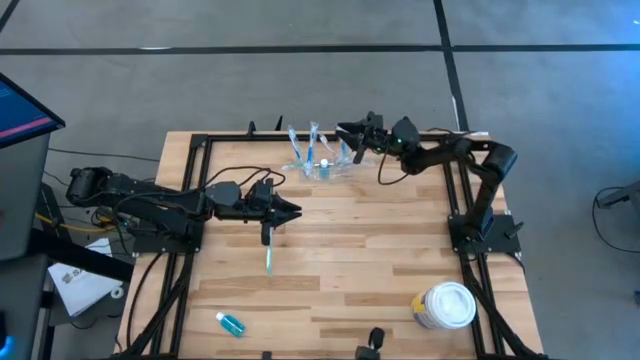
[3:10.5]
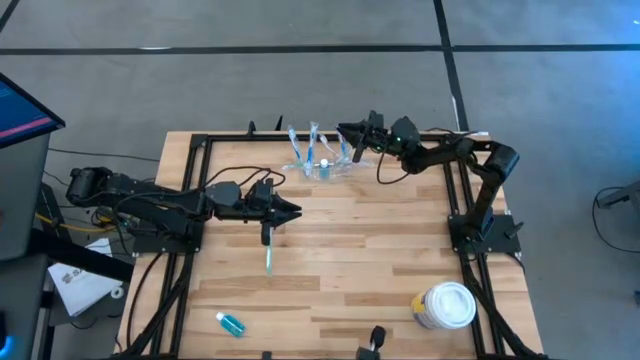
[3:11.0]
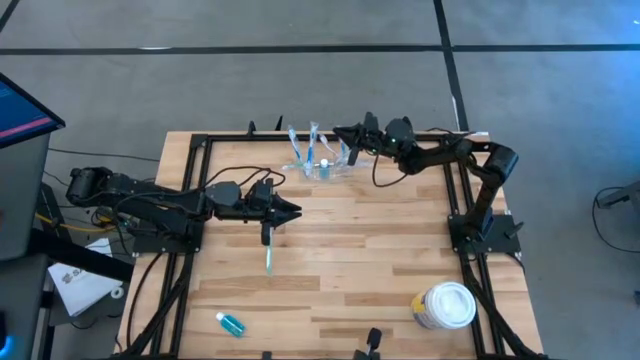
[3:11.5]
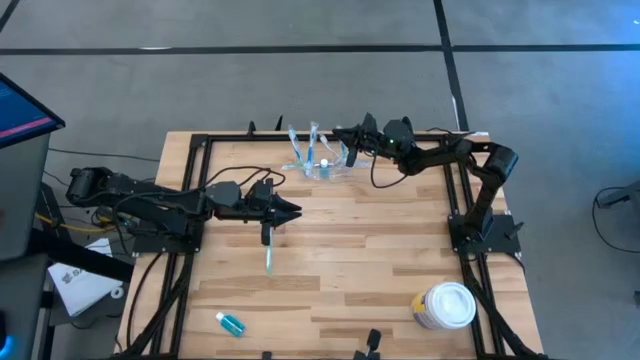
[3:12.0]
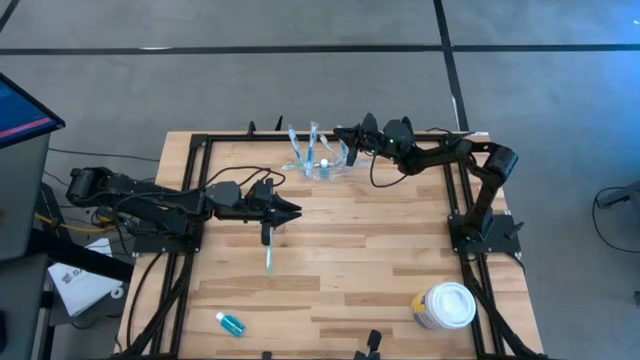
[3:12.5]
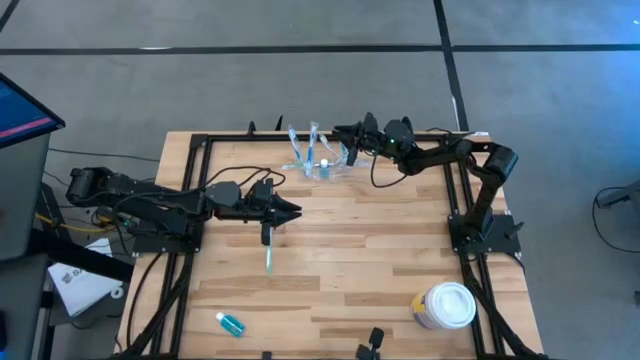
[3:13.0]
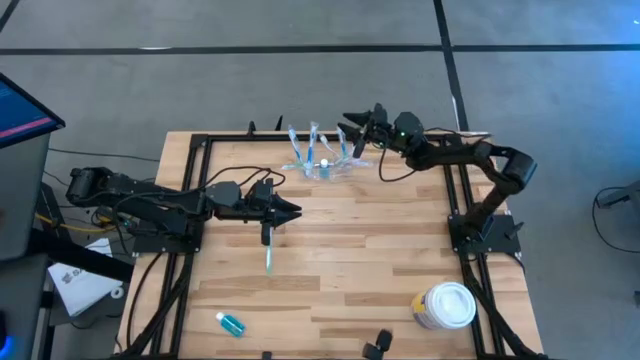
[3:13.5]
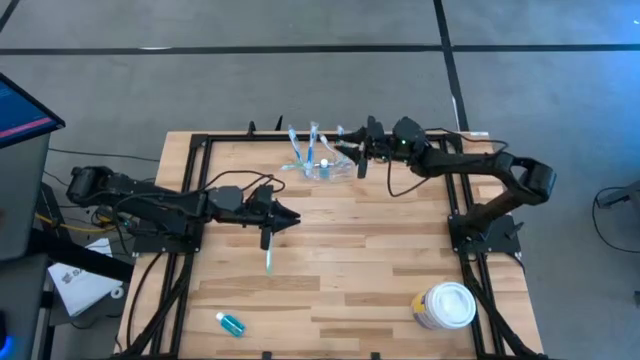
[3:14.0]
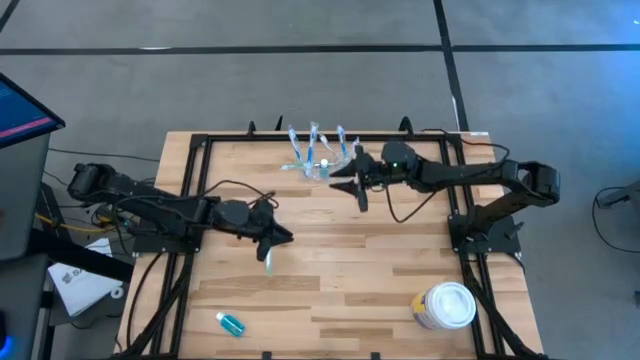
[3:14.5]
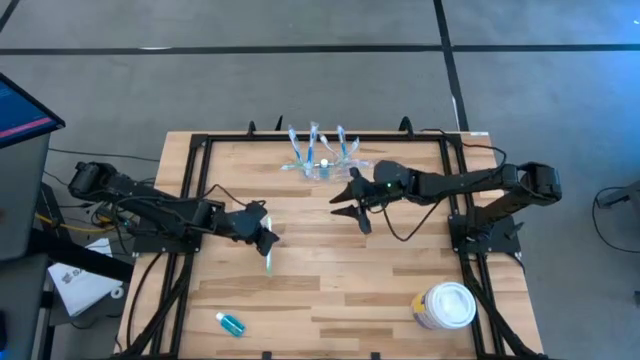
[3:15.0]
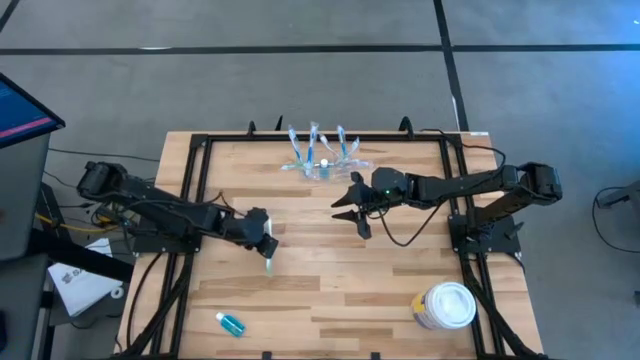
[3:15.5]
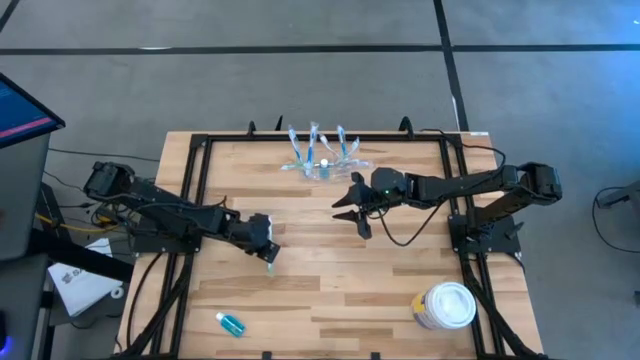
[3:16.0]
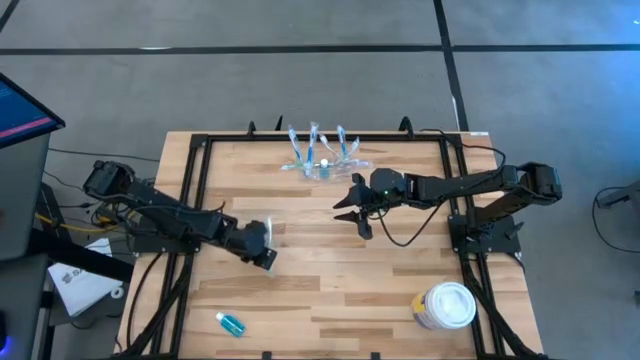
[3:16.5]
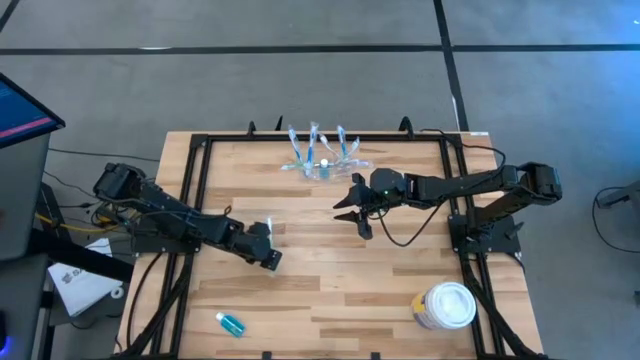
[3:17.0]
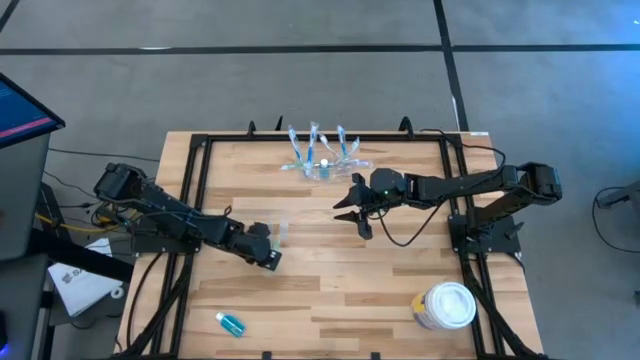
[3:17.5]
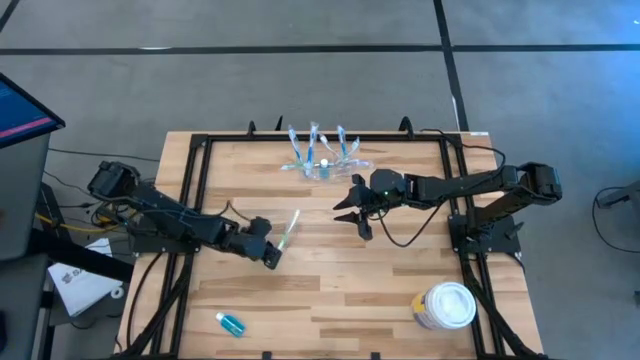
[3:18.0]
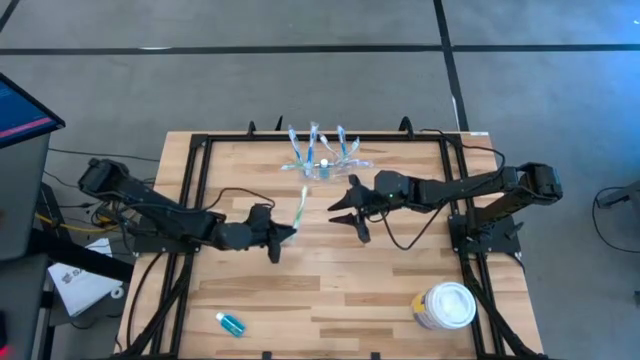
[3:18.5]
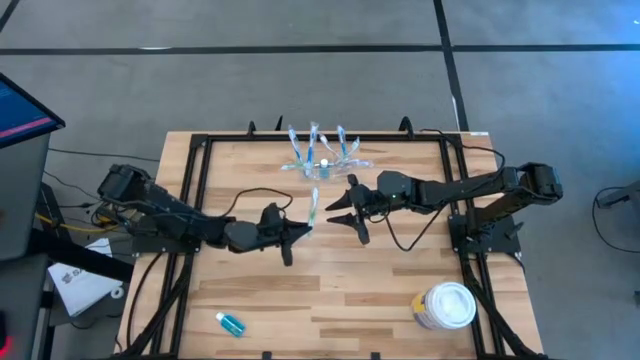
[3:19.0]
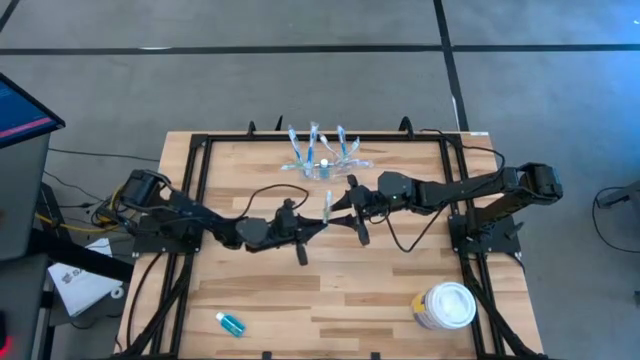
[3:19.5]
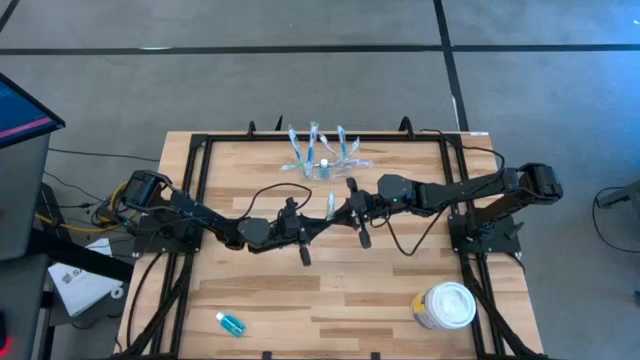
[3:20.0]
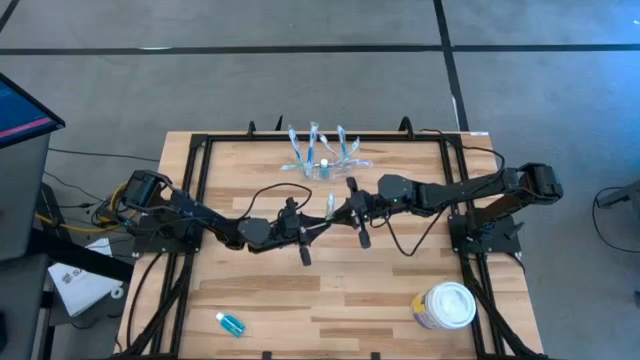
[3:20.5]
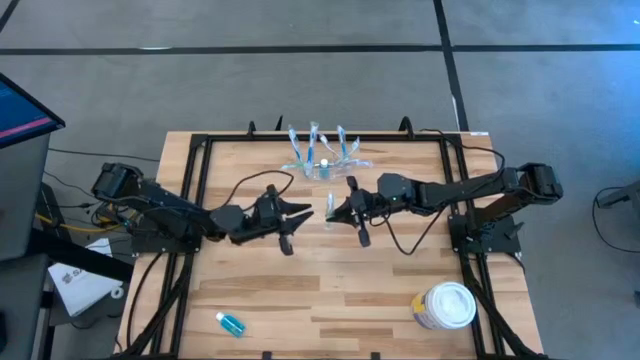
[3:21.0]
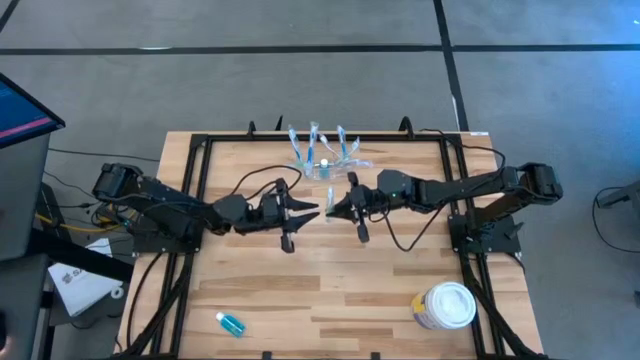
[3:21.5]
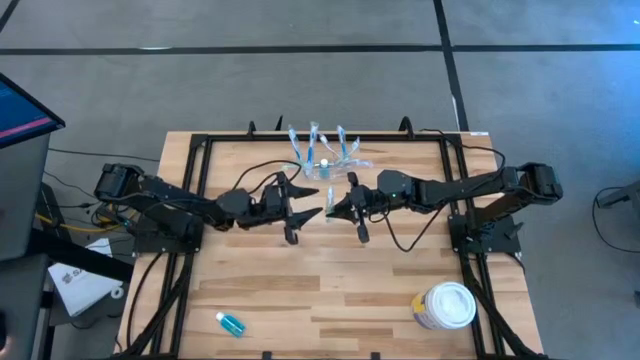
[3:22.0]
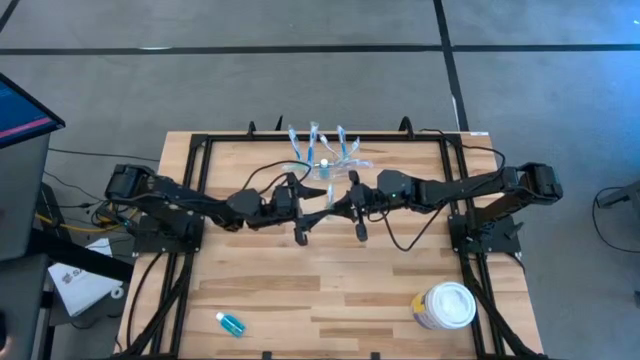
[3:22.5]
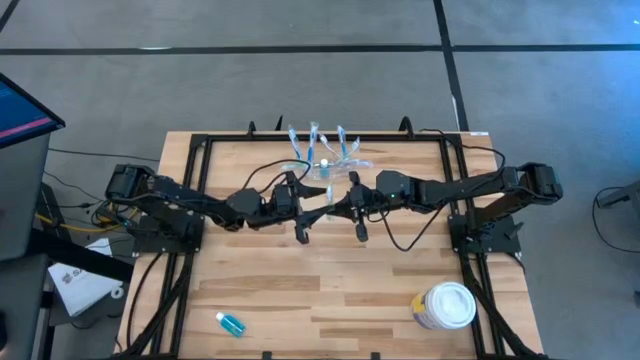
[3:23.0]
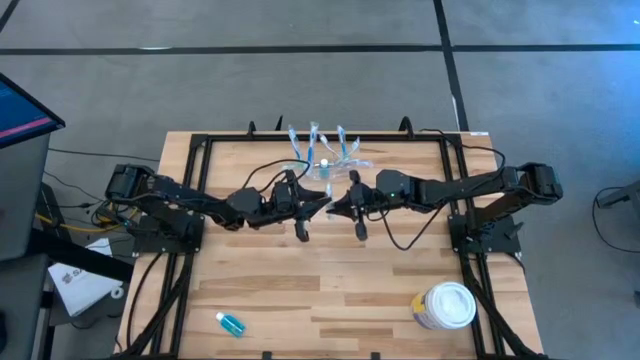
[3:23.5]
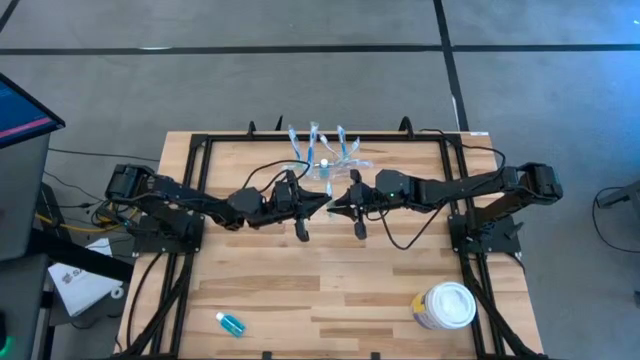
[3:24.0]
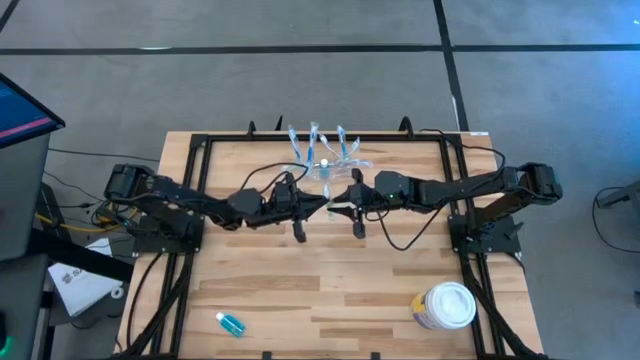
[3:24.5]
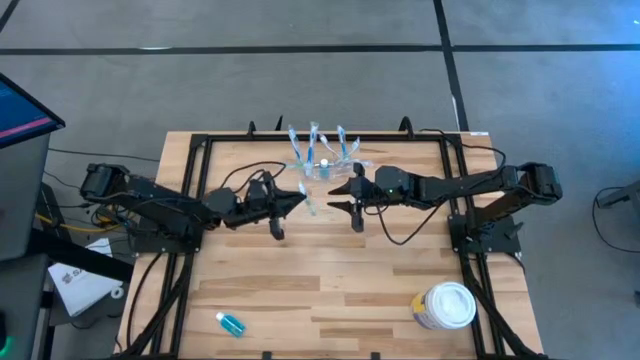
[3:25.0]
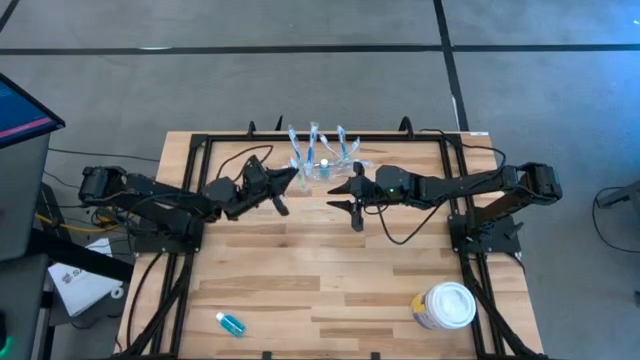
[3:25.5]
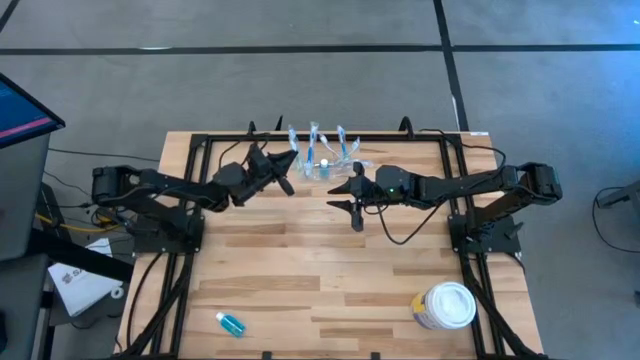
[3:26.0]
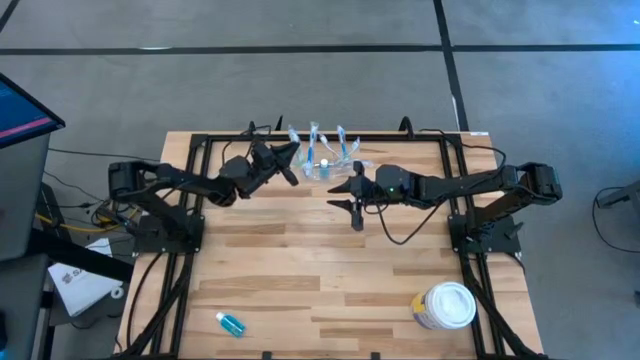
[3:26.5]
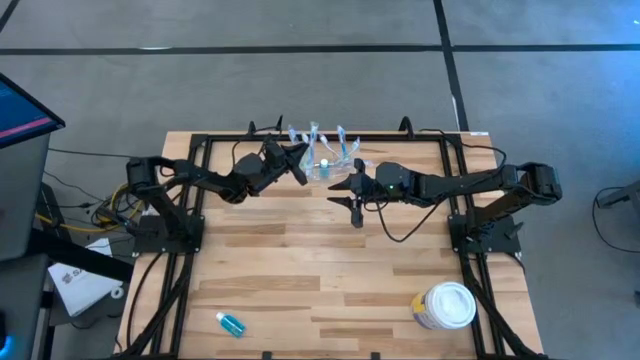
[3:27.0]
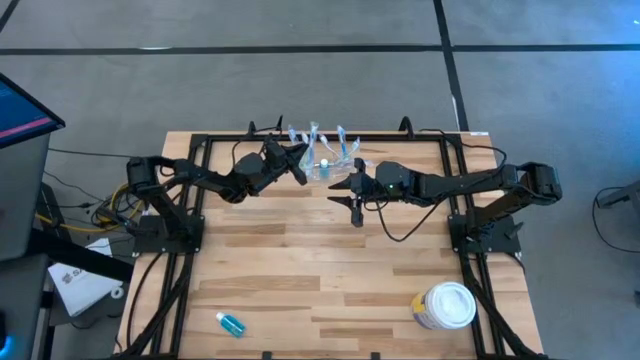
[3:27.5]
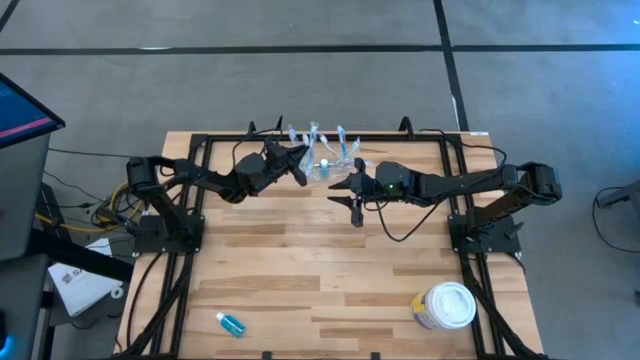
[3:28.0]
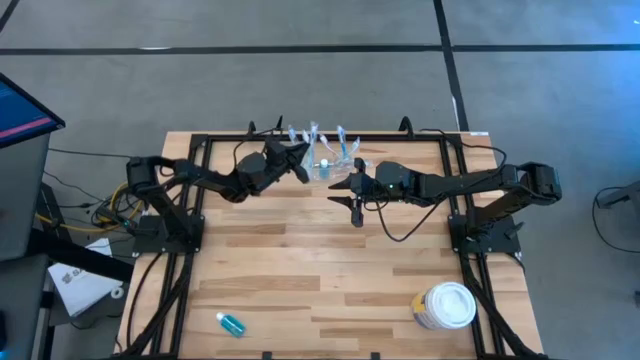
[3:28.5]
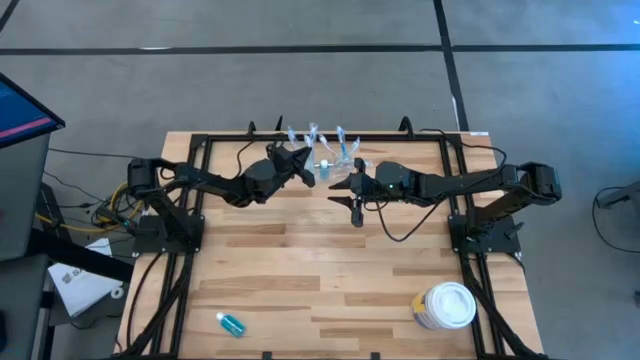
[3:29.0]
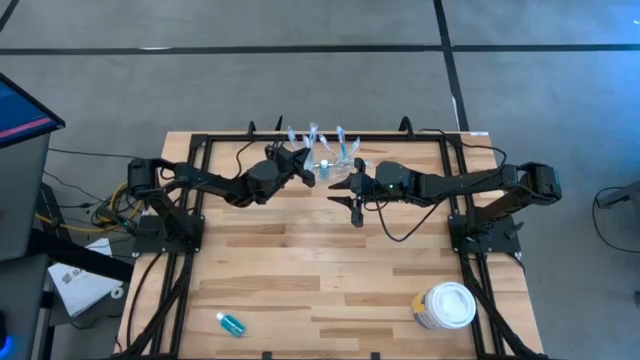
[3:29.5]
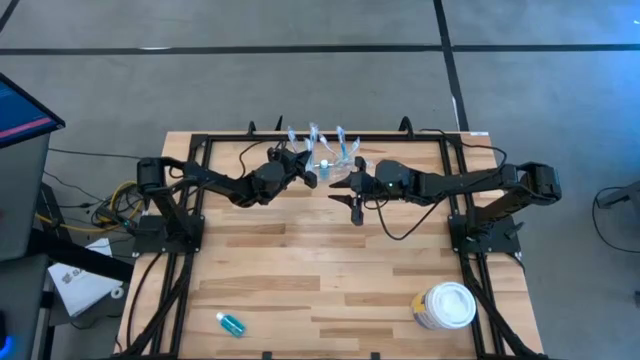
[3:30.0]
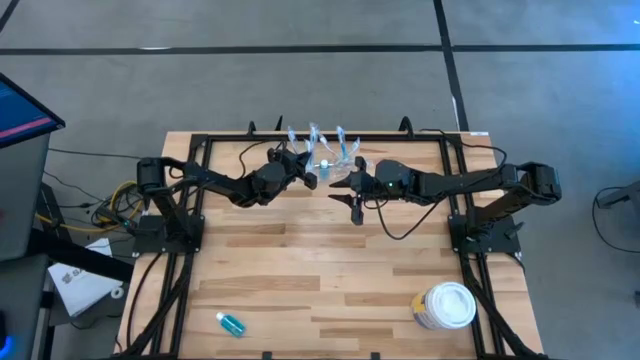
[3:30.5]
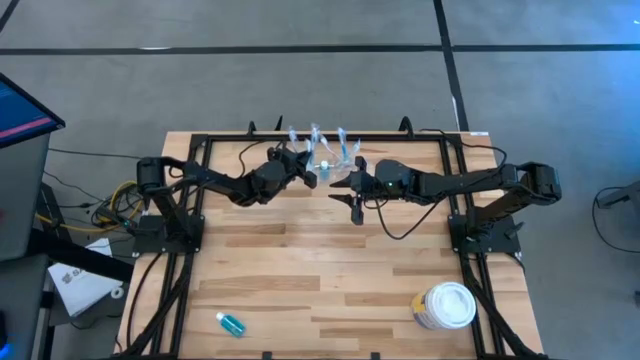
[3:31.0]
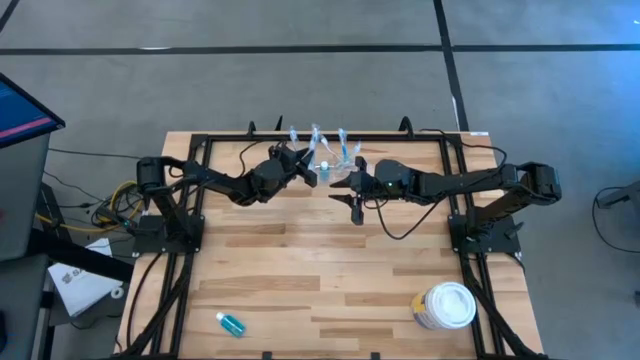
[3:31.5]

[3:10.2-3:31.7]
Task: Pick & Place toothbrushing station
Put the green toothbrush into the transparent organizer
